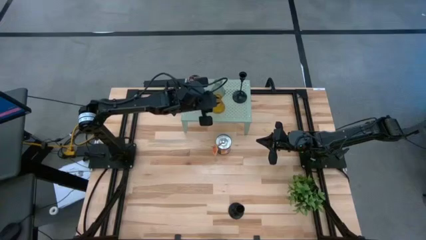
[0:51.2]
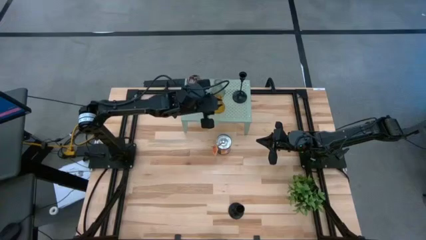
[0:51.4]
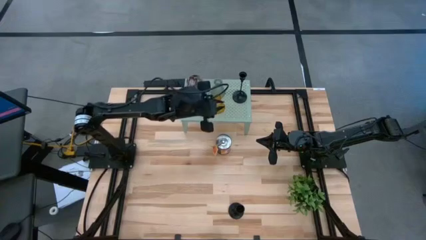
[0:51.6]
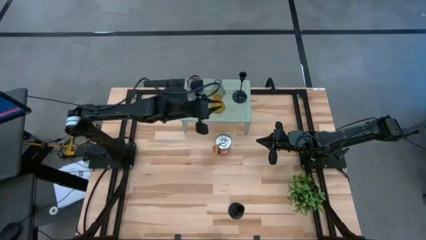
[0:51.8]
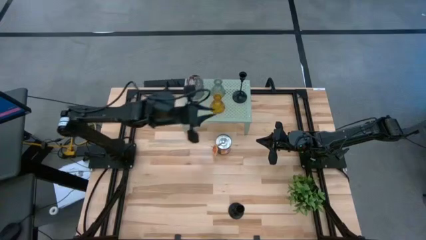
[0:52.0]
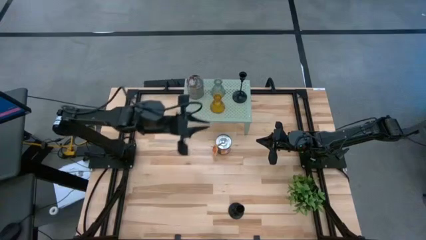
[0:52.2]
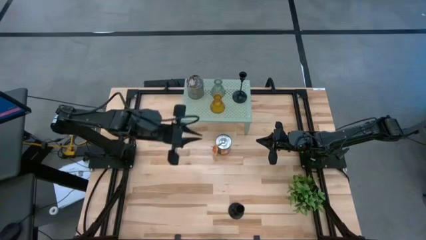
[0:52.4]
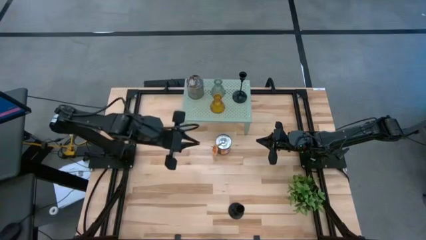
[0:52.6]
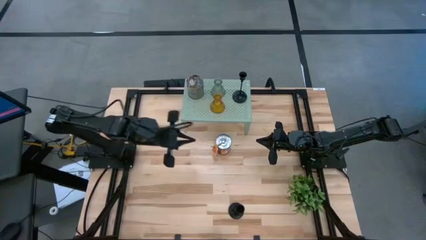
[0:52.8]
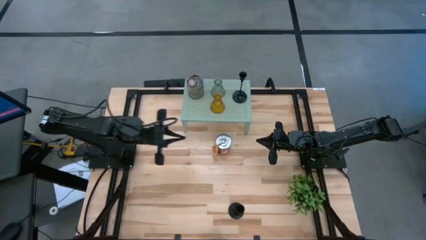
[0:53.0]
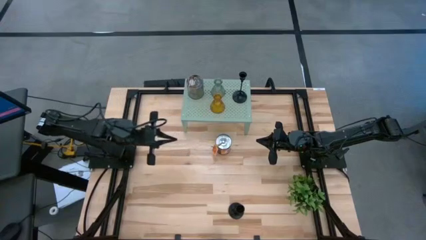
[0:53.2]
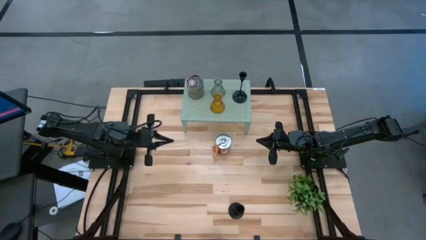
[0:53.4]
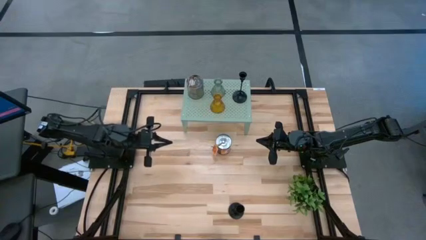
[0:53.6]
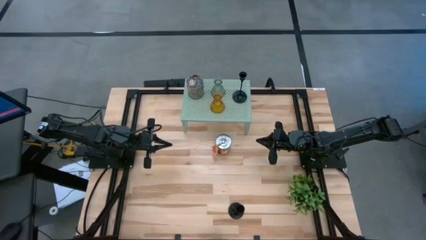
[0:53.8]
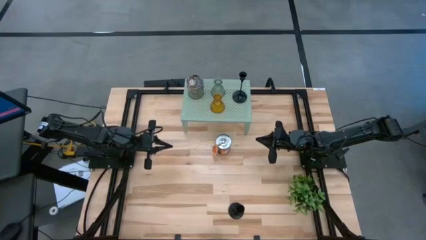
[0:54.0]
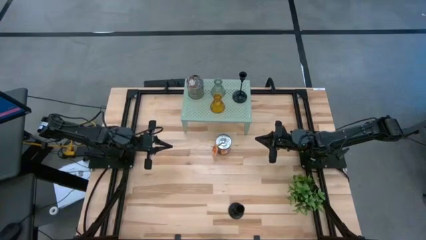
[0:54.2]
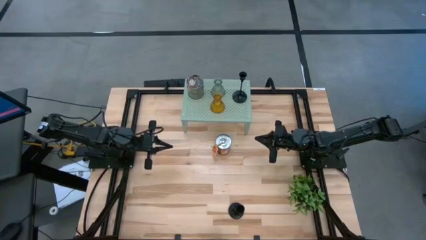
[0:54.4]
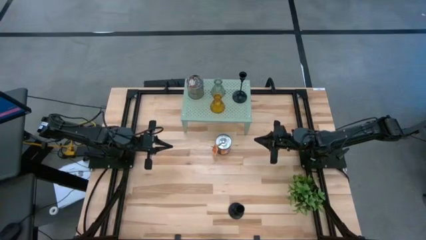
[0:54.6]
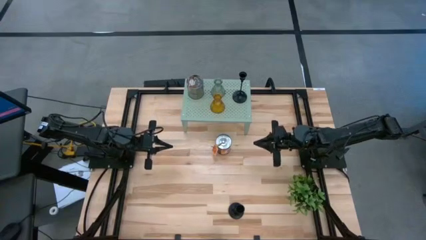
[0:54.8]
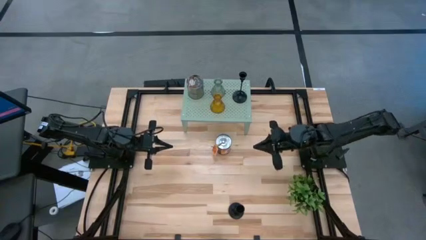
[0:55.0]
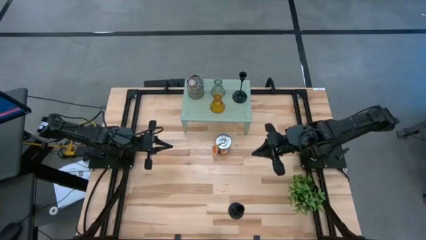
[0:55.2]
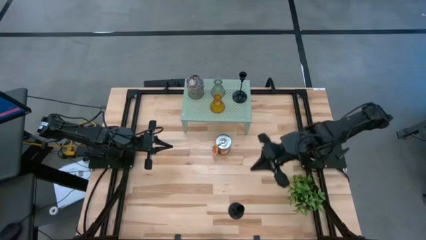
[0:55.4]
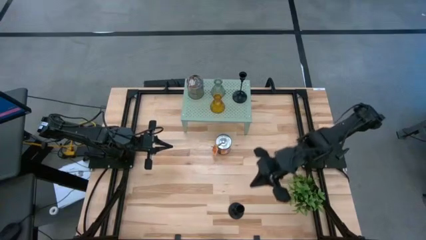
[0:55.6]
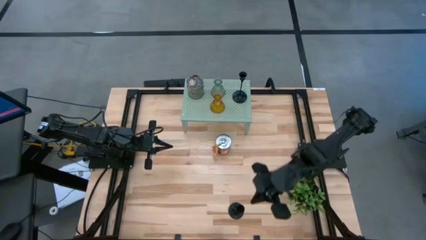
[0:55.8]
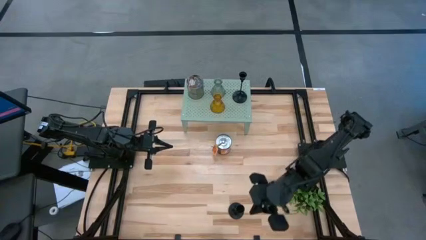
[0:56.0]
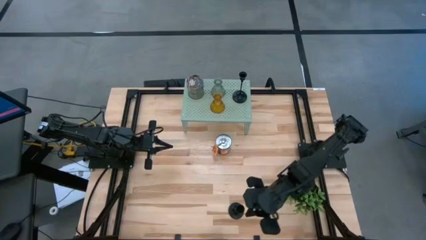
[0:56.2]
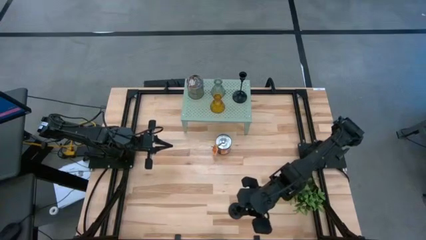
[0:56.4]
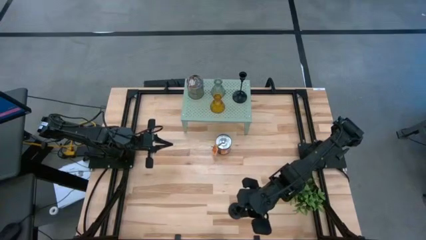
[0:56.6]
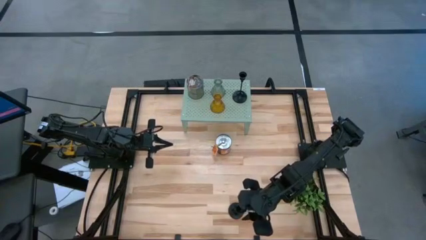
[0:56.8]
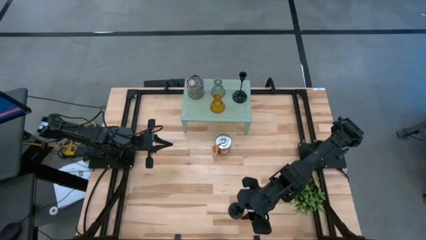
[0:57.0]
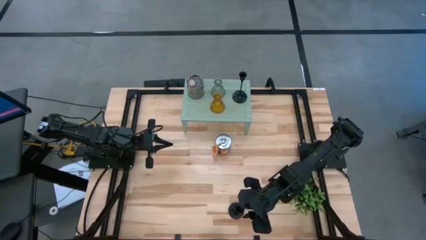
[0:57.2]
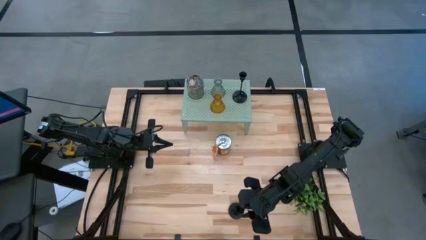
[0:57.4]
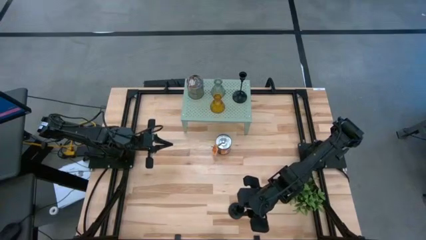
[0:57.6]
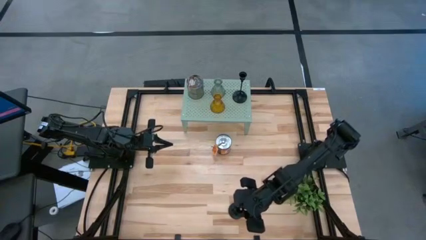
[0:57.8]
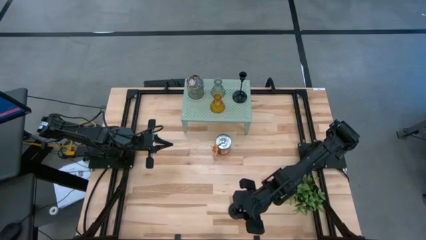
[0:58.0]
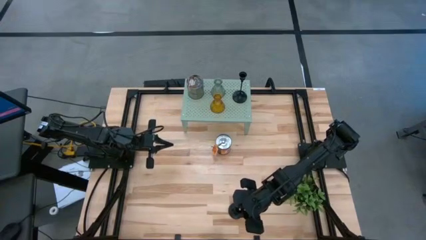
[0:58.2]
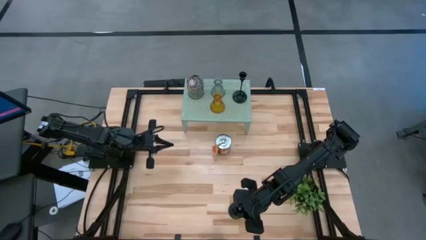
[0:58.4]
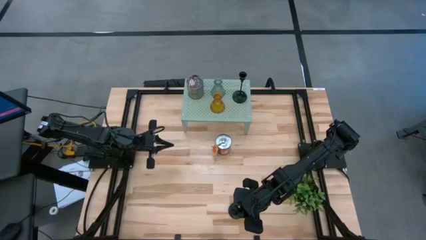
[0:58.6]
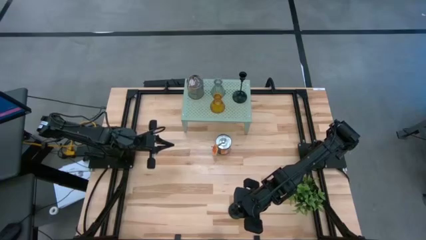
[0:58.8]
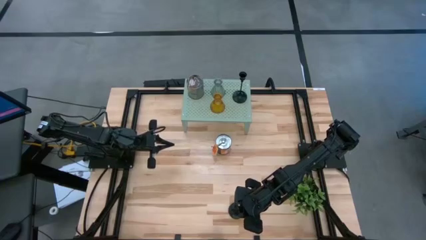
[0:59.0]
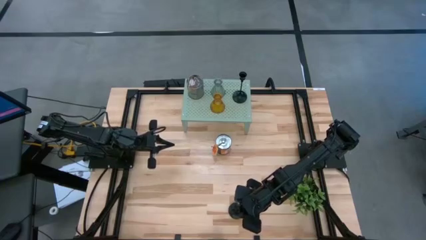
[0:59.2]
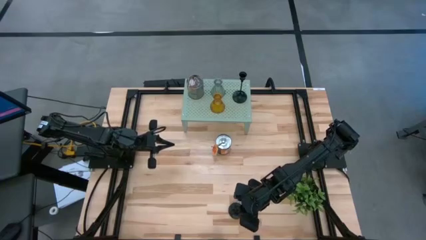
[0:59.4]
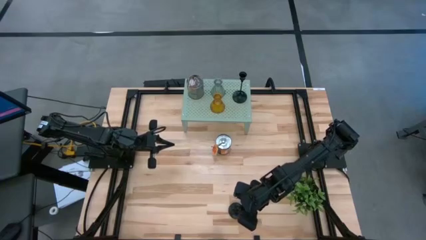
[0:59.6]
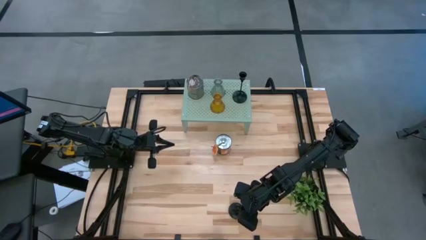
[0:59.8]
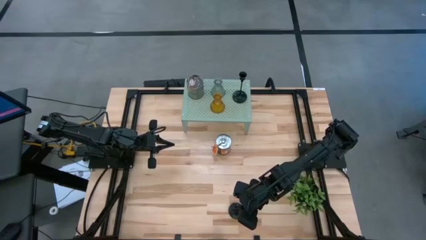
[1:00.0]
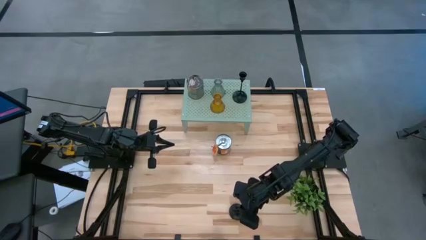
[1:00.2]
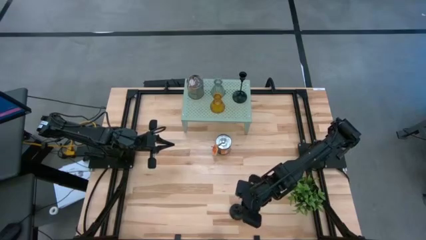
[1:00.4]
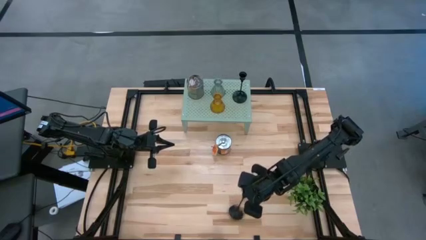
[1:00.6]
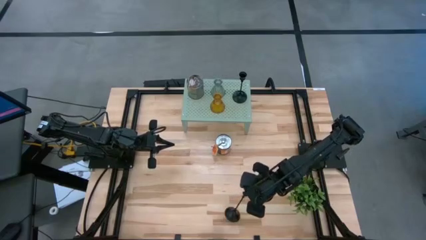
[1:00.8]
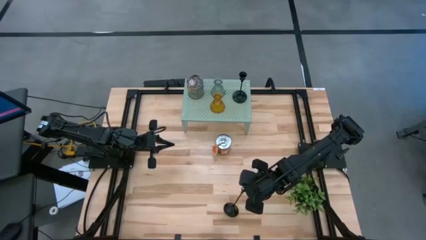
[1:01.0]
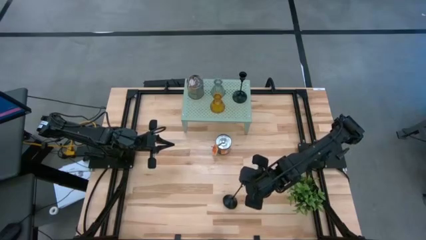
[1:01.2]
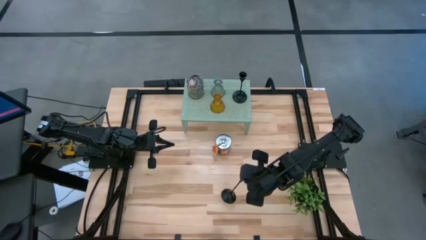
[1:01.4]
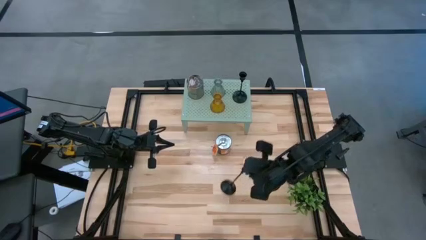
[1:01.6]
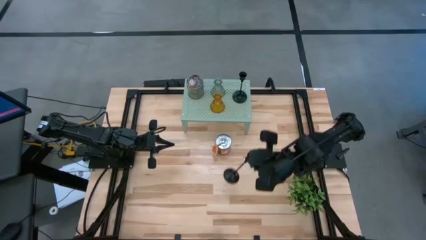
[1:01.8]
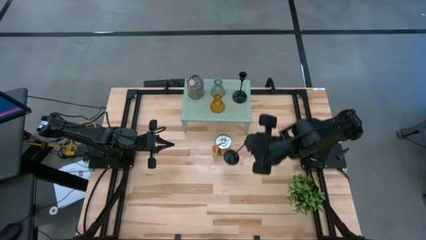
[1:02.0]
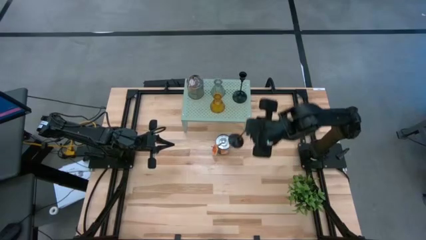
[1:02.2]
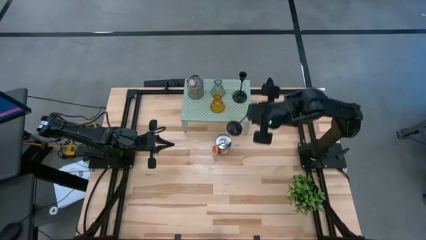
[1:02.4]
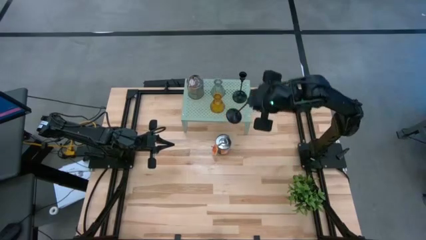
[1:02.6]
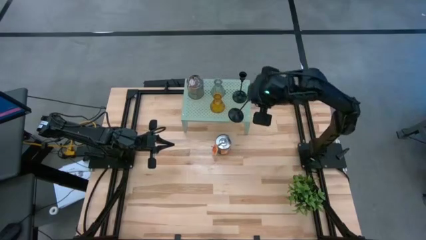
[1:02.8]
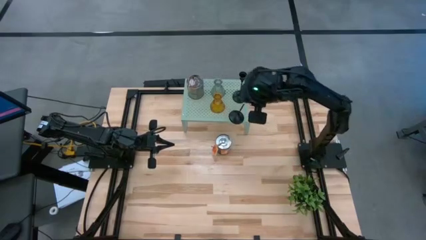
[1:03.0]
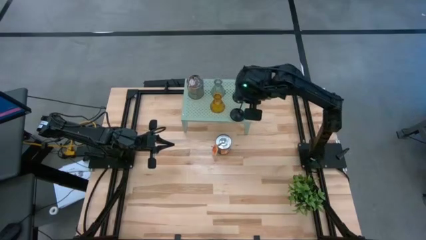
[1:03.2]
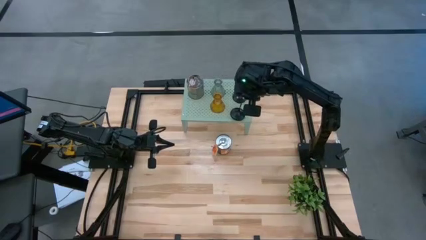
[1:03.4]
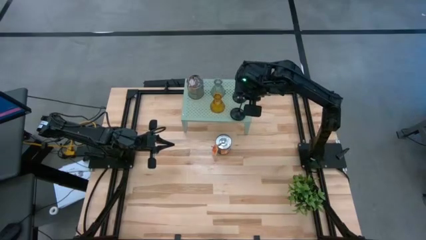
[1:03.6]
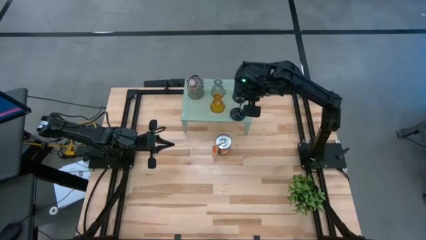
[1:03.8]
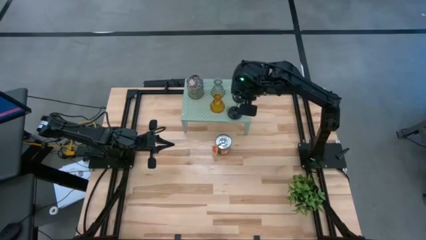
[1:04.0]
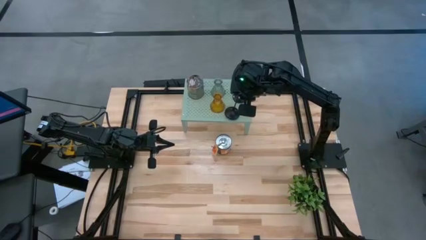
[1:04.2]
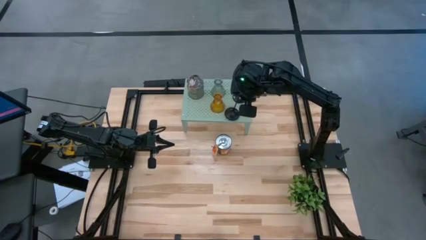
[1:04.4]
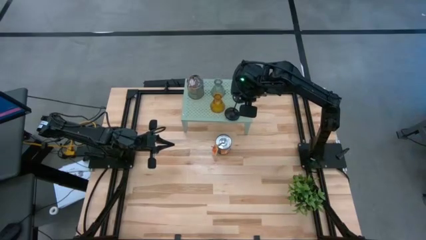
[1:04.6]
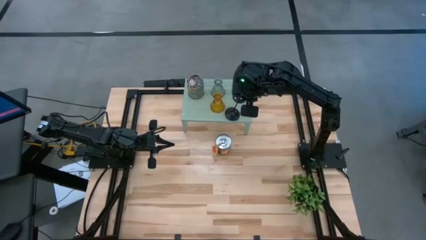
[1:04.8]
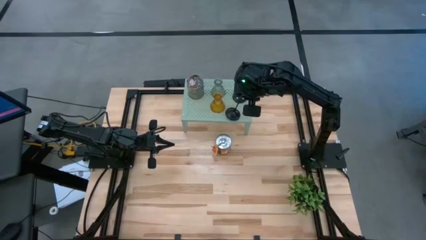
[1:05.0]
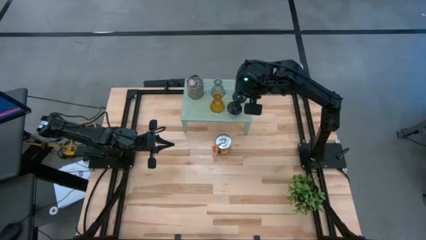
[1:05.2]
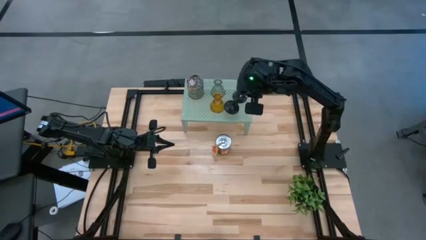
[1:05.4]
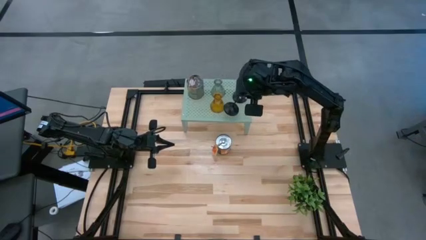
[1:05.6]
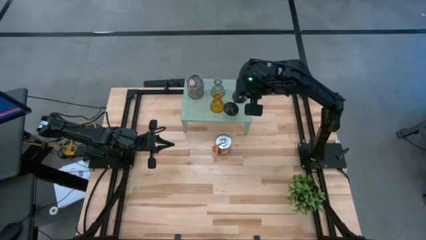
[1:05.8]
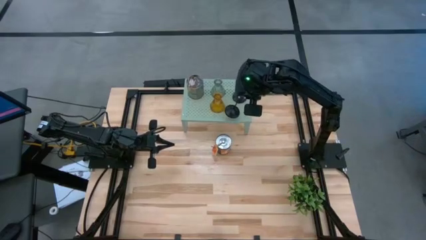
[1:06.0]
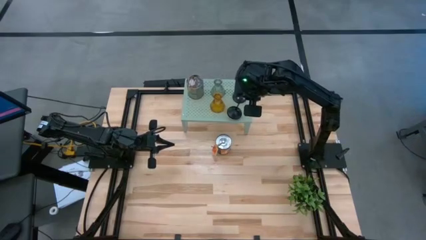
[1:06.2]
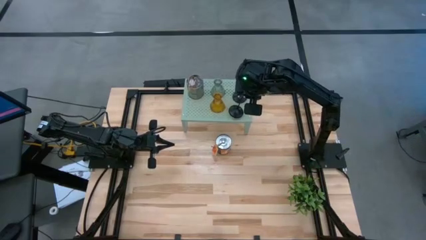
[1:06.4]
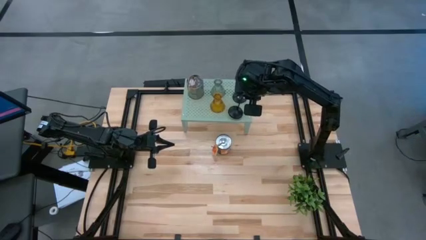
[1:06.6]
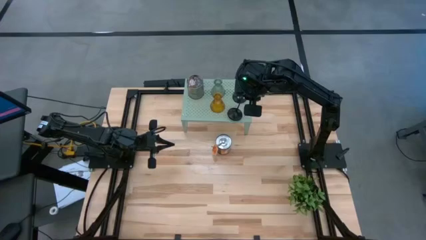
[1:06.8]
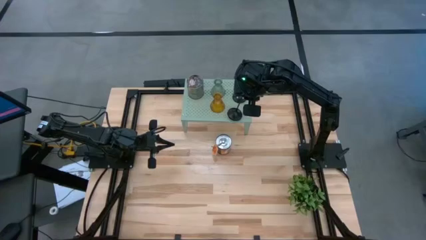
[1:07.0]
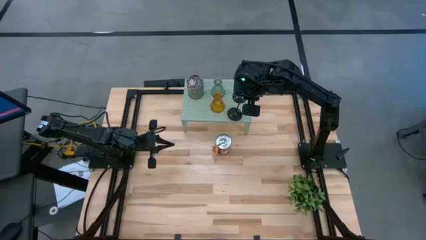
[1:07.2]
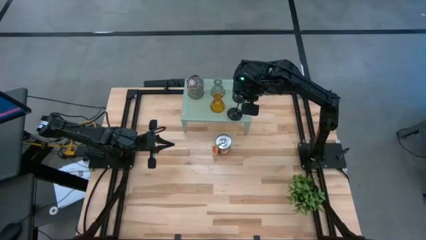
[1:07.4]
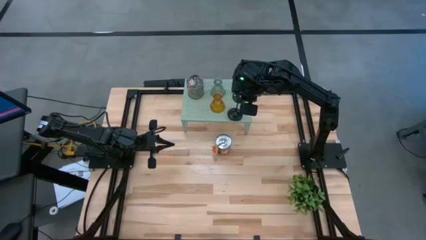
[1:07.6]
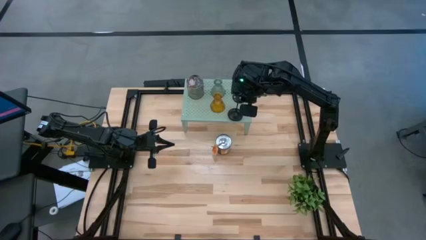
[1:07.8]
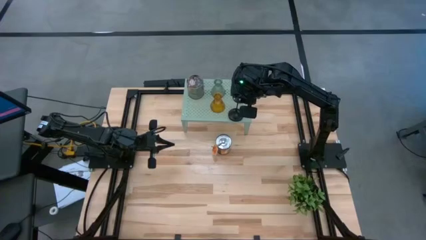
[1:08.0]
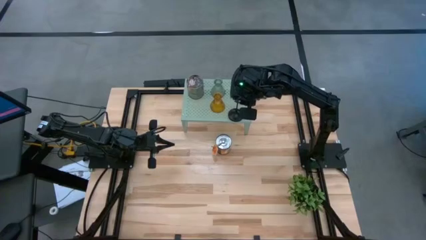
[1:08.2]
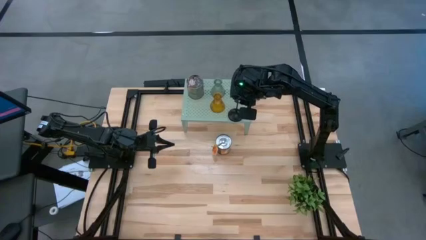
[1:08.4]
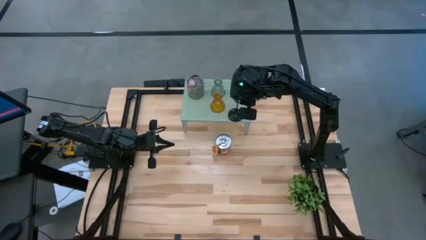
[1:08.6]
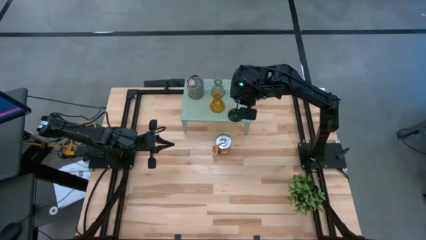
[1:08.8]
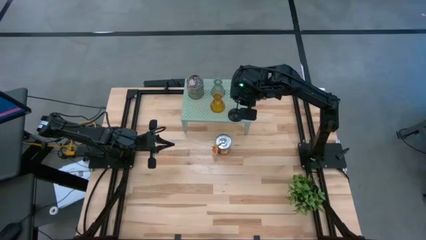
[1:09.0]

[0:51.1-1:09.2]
Task: Pick & Place candle stick holders
Put the black candle holder on the shelf
